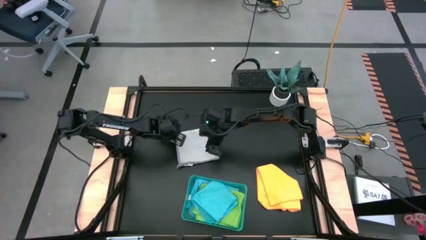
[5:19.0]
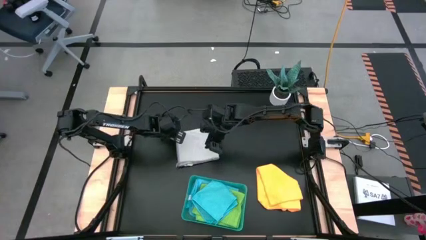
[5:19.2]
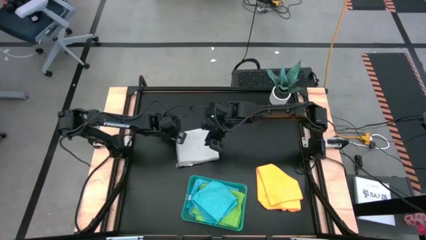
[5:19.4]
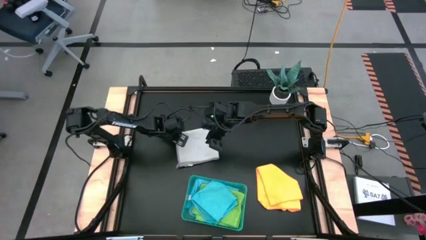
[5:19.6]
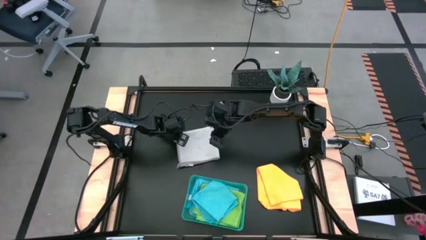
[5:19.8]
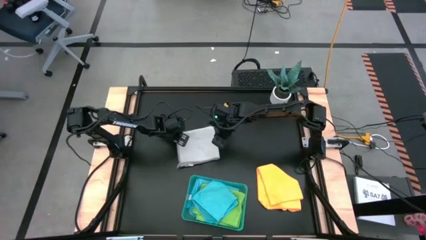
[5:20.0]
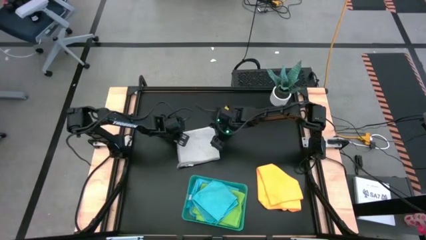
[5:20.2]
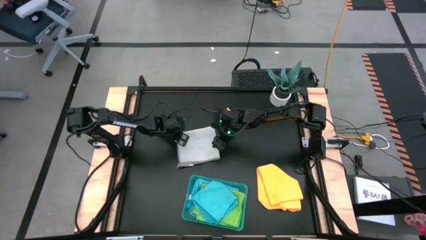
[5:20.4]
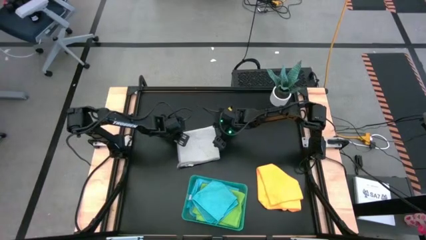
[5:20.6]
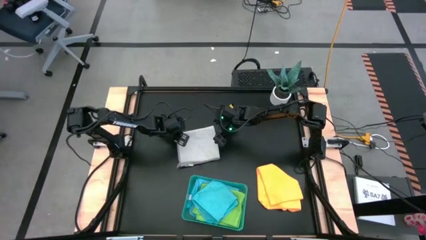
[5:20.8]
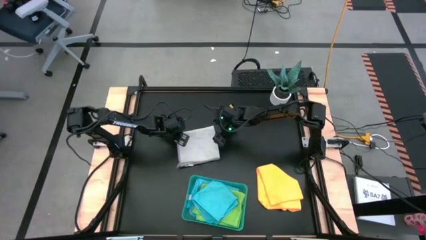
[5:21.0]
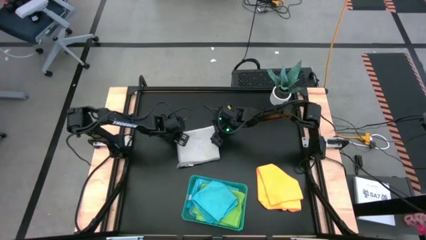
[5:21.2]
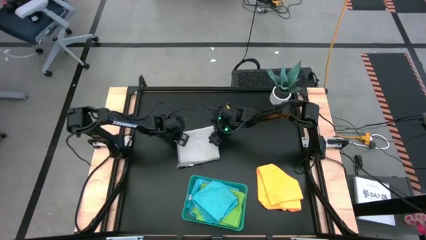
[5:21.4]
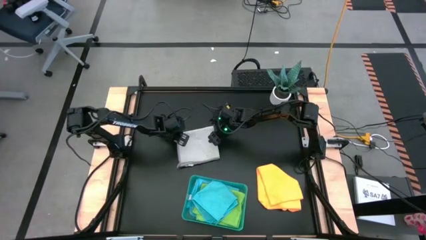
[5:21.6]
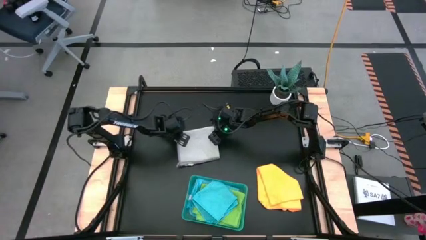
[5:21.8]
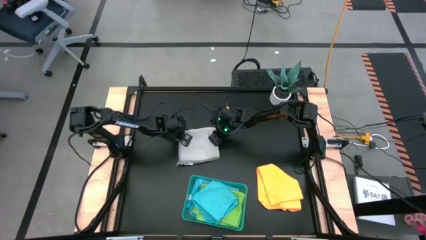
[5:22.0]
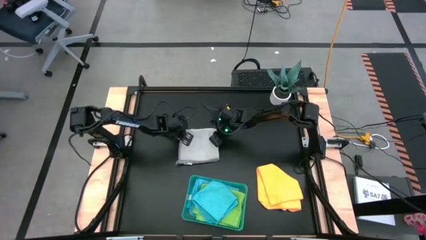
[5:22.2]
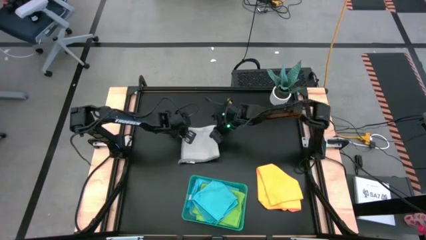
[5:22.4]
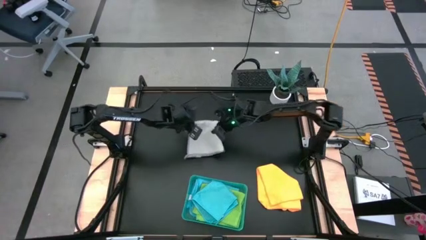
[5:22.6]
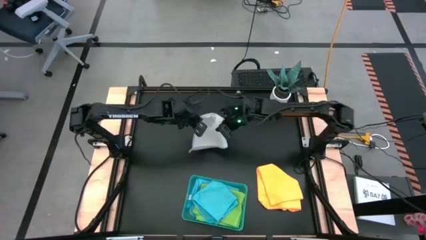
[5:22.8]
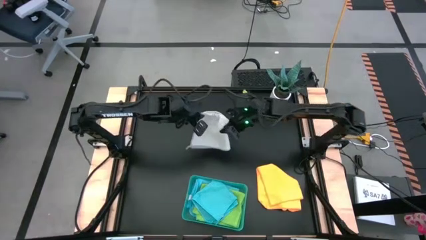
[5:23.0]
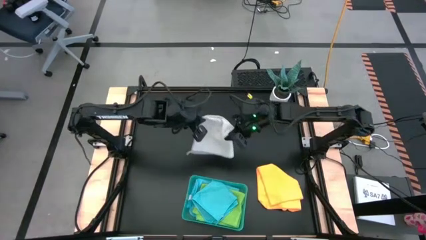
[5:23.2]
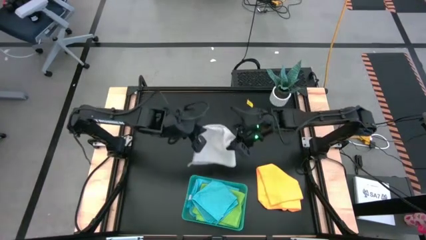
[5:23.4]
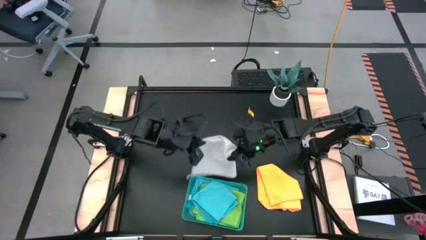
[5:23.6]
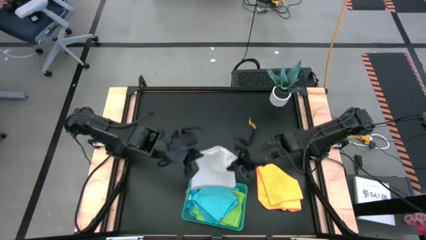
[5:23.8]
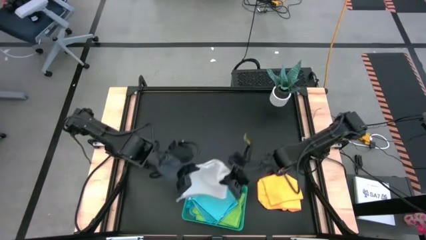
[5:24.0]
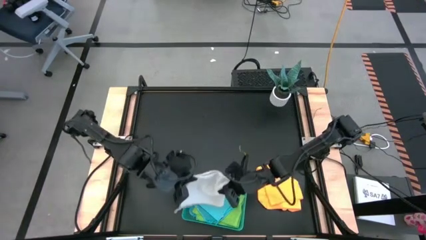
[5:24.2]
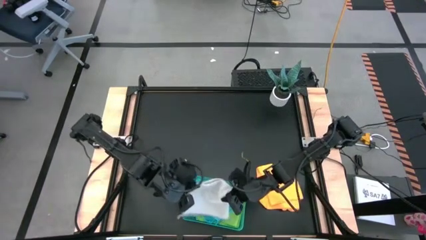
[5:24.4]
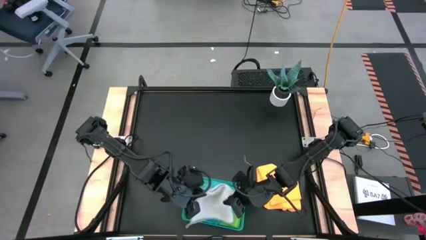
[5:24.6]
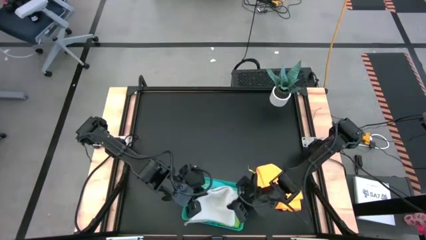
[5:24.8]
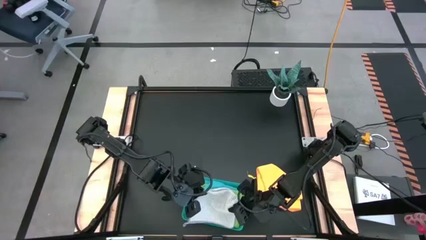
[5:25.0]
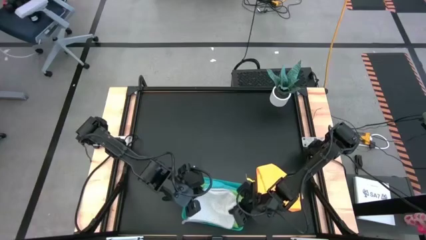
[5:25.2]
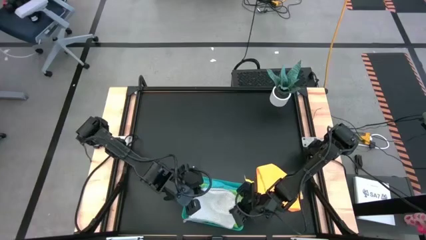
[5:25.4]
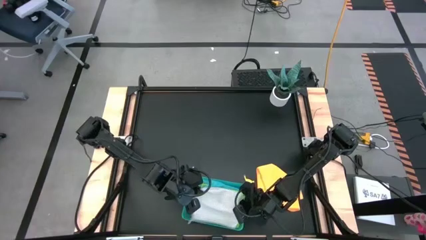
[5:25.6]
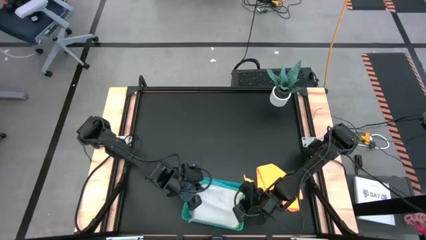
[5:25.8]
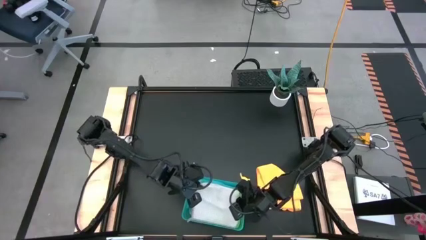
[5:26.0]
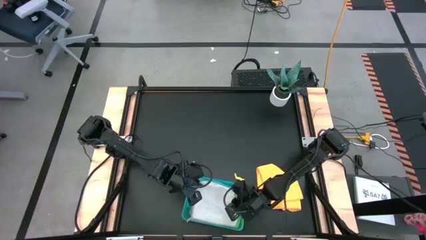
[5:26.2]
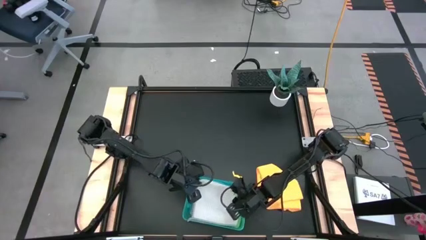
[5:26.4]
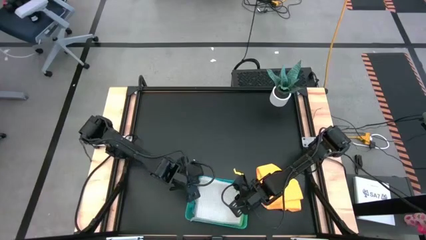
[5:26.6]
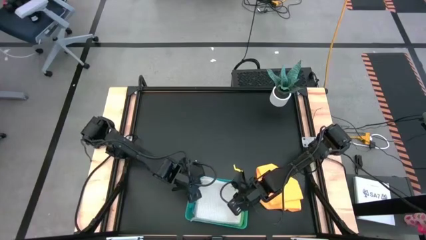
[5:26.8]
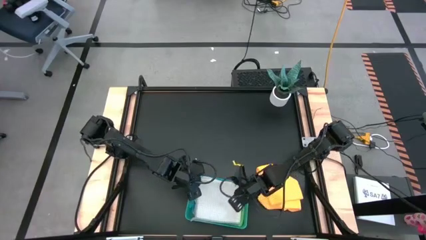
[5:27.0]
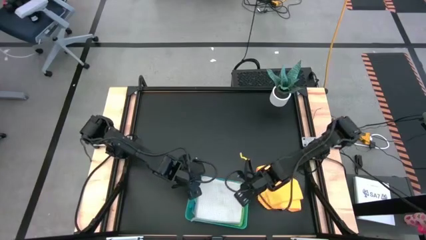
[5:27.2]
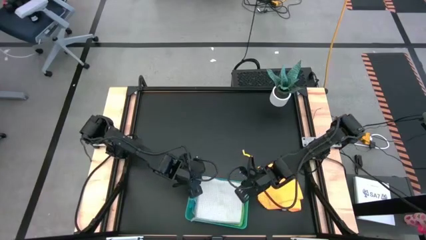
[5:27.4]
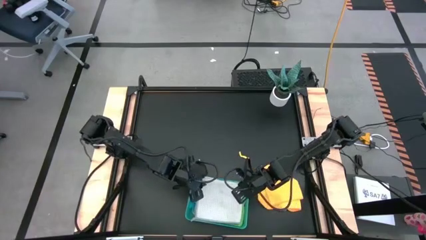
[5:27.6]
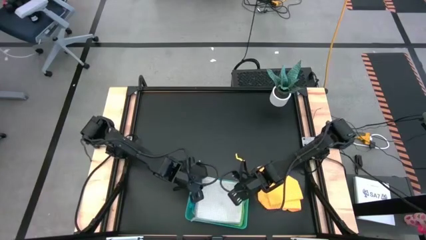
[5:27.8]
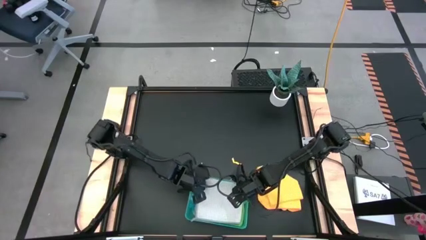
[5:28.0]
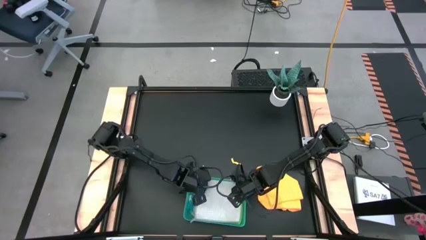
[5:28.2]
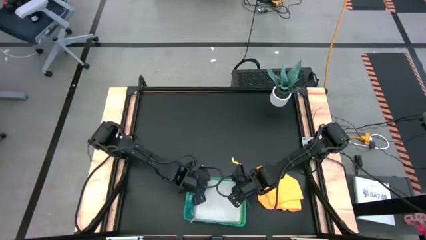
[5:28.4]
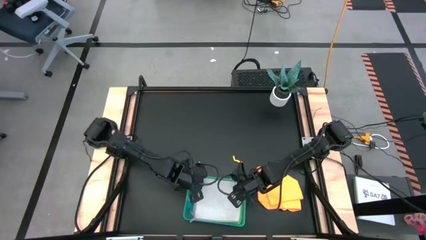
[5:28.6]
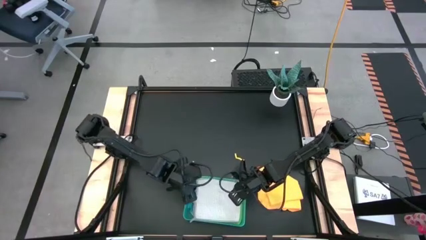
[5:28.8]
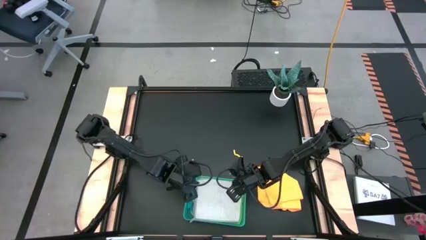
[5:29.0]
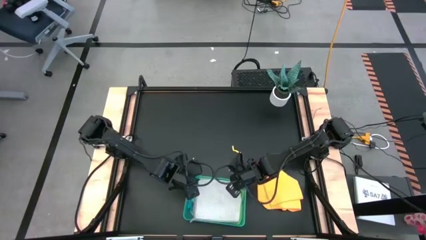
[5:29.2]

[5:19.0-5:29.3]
Task: Fold microfiber towels
Put the folded gray microfiber cloth into the green transparent bin

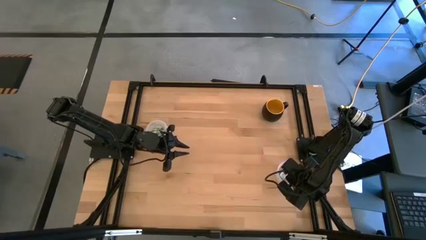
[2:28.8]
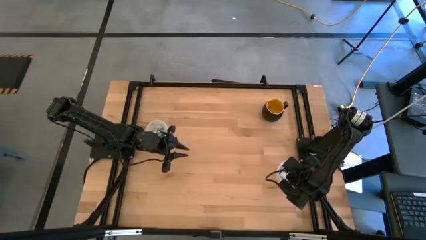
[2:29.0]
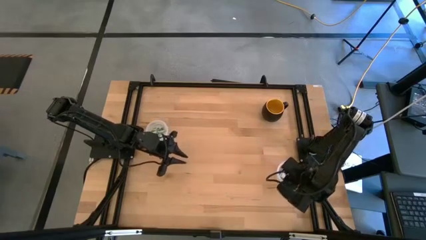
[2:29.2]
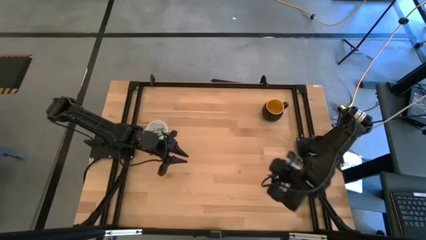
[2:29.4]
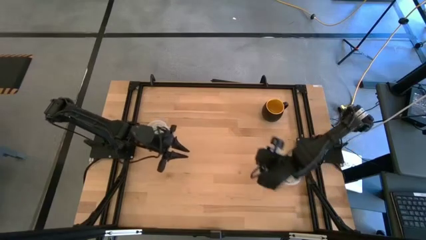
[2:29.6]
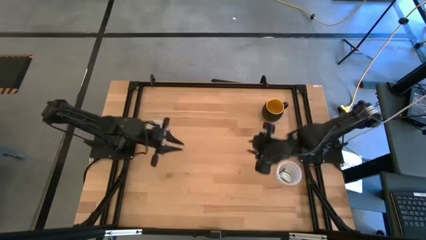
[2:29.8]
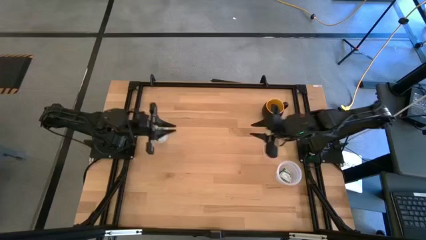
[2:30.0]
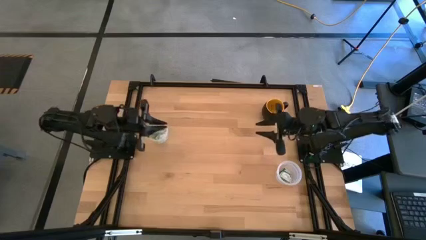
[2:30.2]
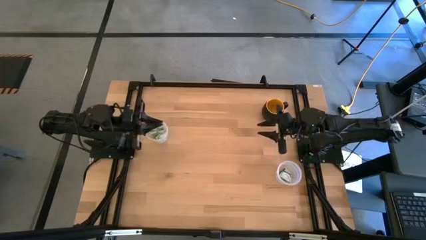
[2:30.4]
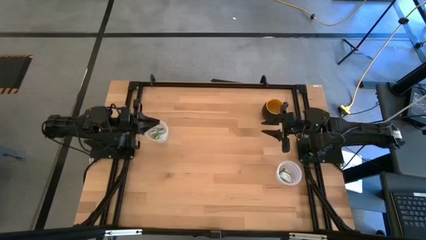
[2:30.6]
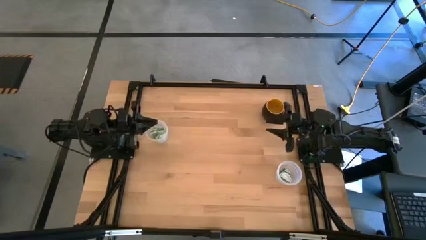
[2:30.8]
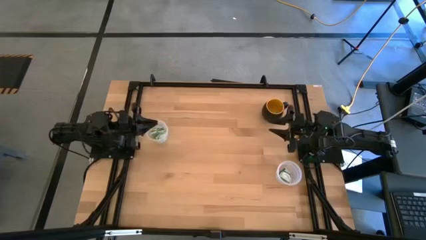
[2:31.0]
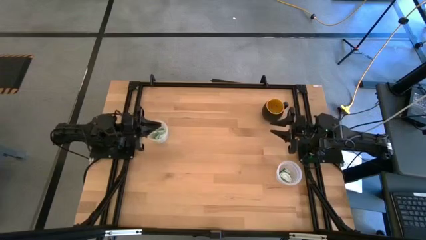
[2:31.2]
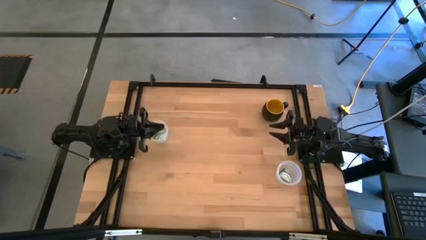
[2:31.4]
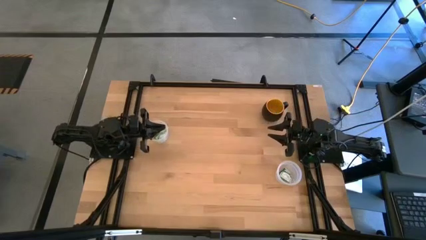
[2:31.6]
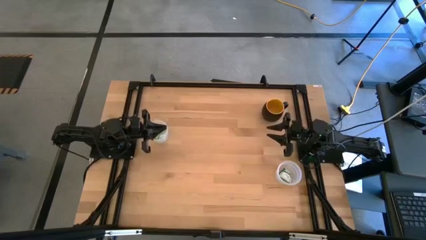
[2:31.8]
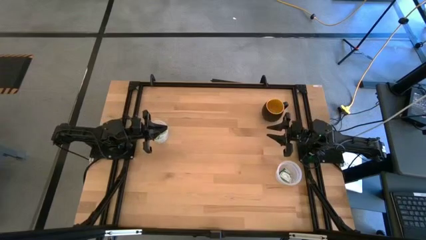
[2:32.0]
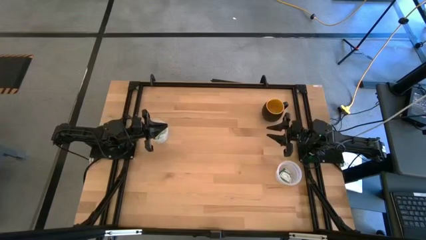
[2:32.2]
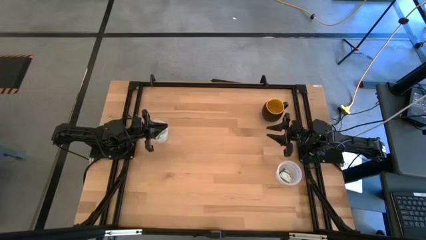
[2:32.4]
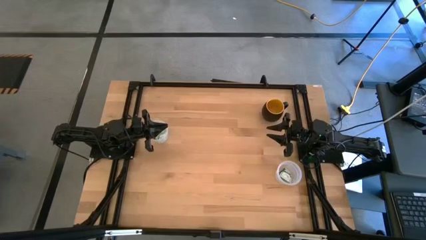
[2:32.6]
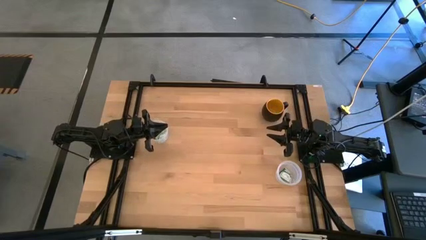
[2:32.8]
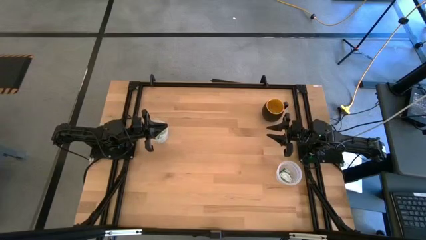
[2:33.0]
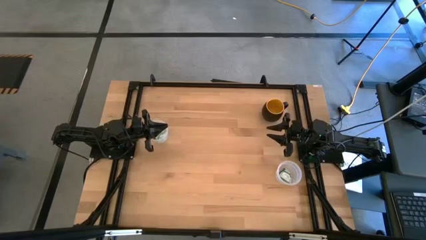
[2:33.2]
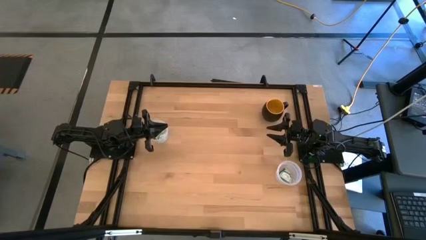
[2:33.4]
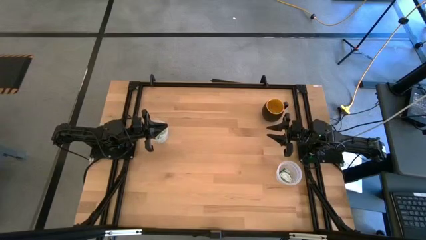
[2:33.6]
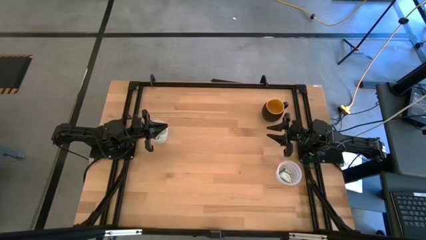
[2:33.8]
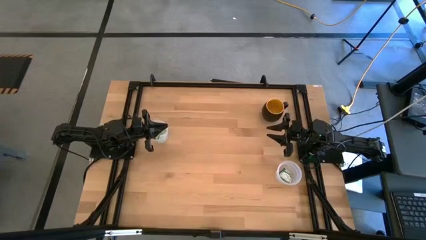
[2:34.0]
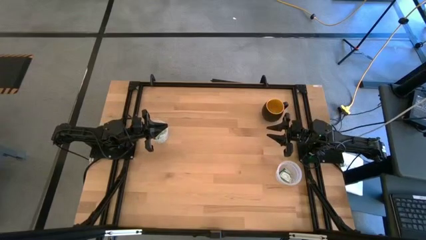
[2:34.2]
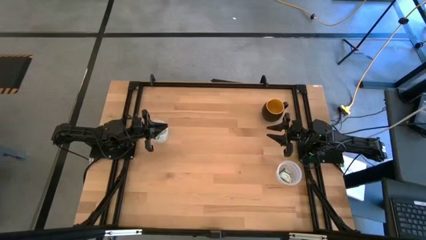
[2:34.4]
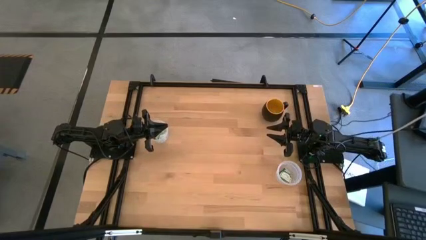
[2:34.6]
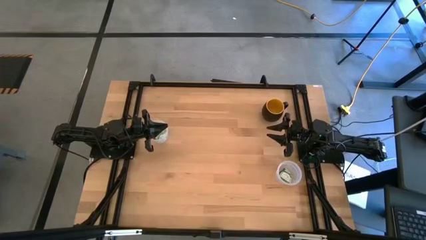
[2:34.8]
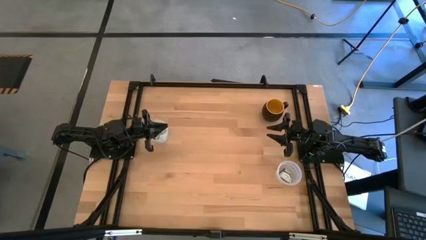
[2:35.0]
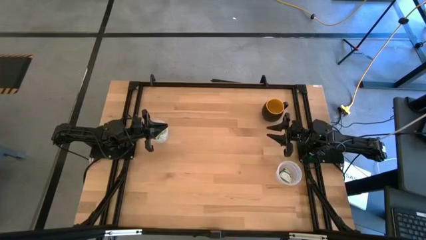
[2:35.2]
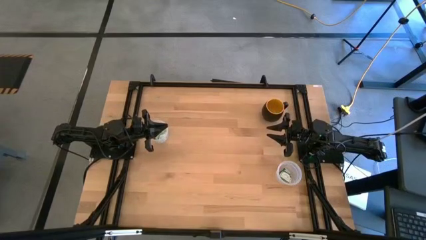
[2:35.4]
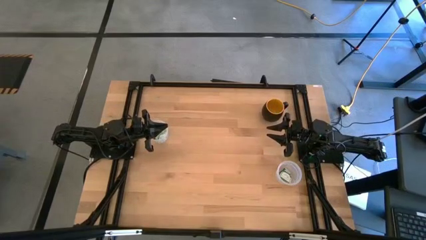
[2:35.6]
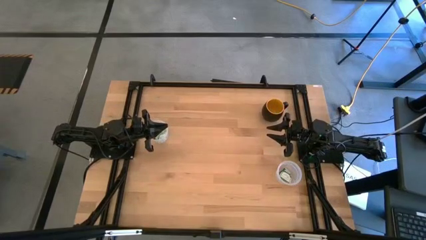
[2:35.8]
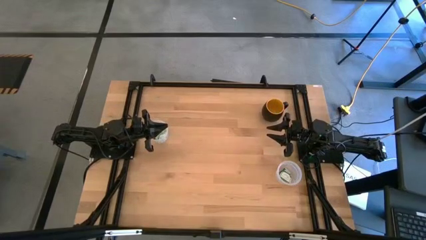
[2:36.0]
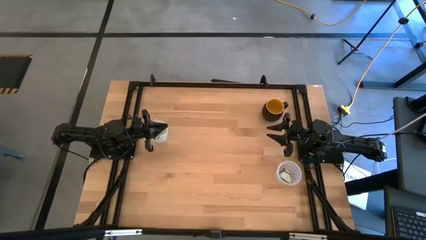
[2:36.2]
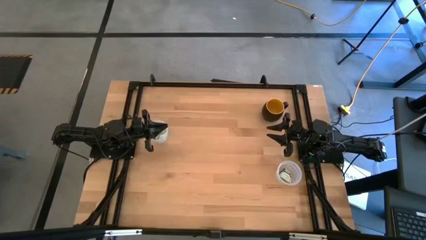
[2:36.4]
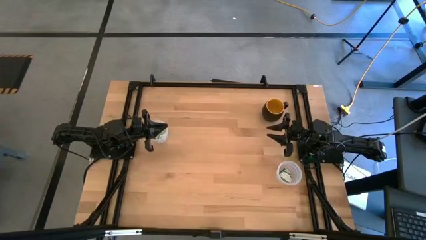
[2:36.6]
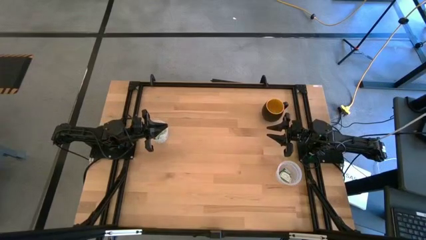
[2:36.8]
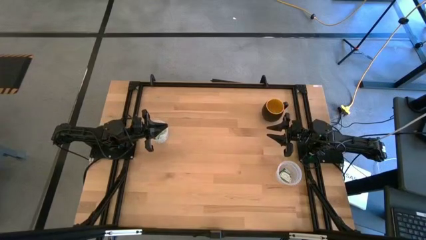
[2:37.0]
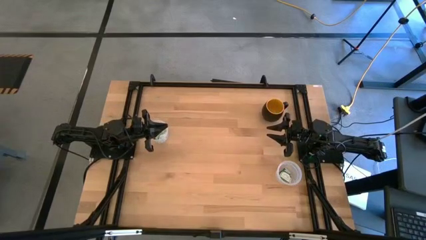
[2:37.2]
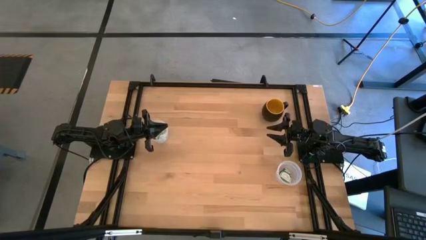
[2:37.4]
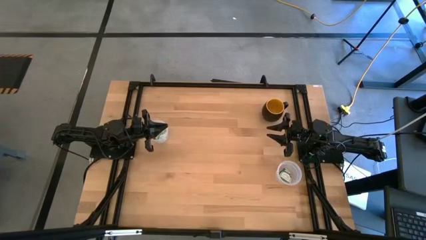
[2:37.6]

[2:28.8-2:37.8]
Task: Pick and place Stevia / Truvia into bins
Return to Home Position
